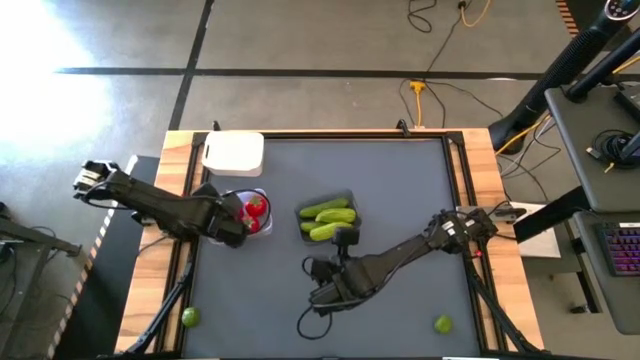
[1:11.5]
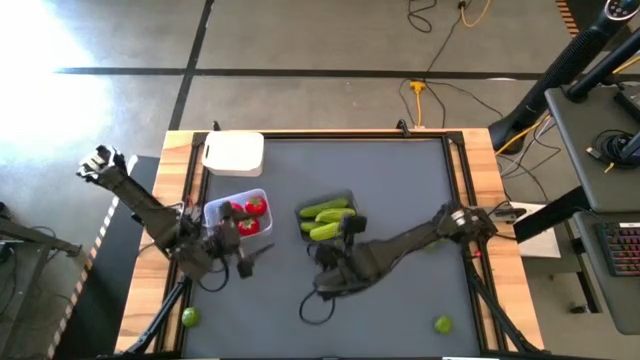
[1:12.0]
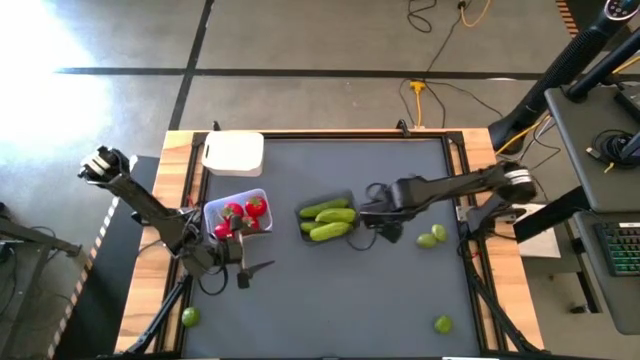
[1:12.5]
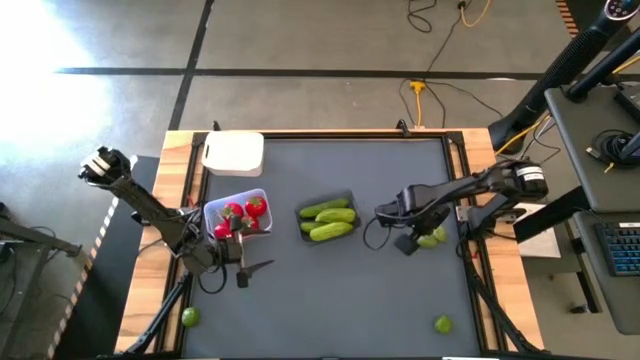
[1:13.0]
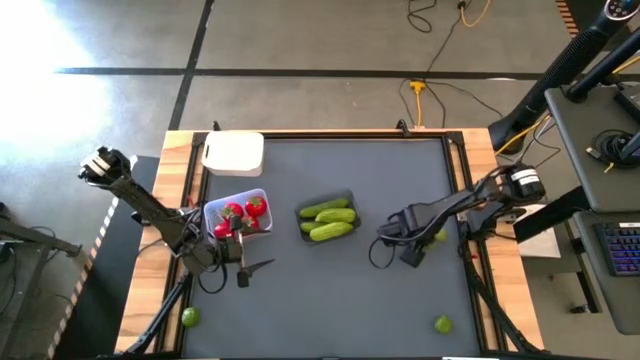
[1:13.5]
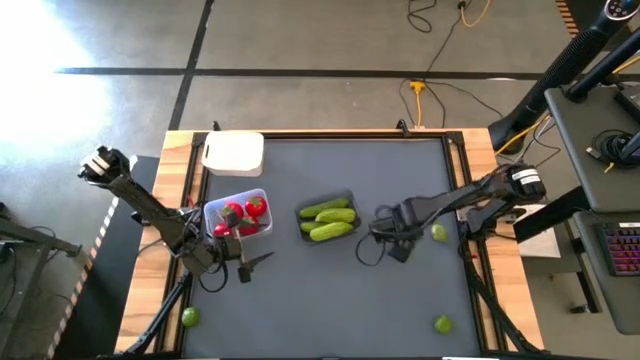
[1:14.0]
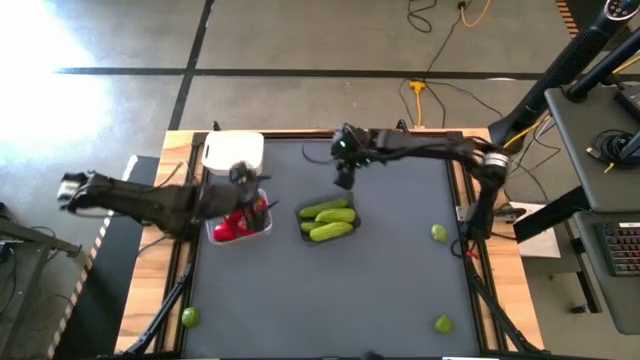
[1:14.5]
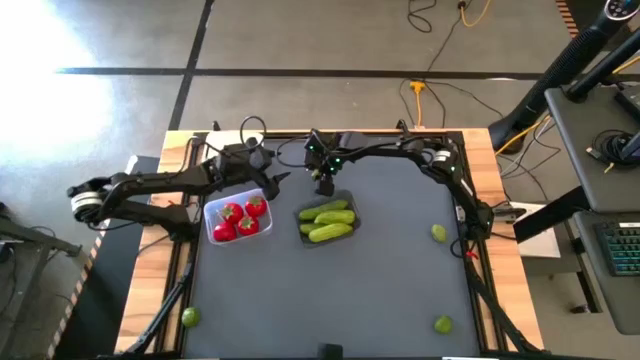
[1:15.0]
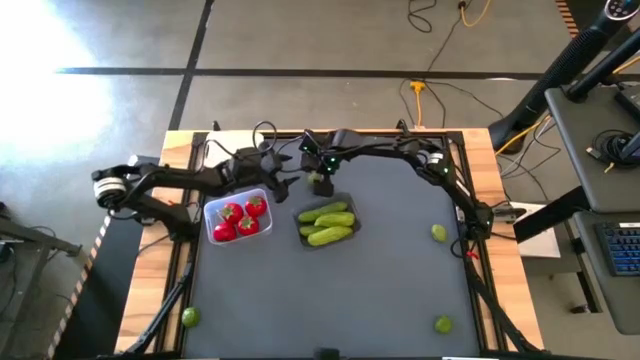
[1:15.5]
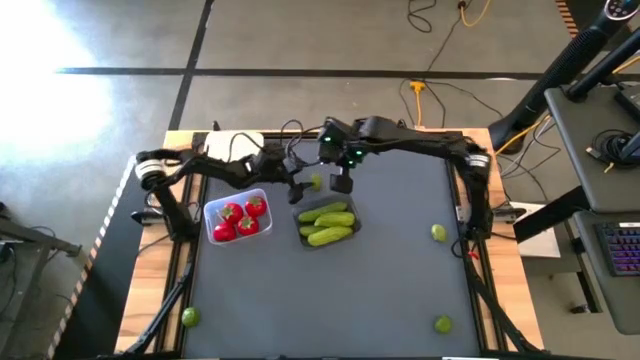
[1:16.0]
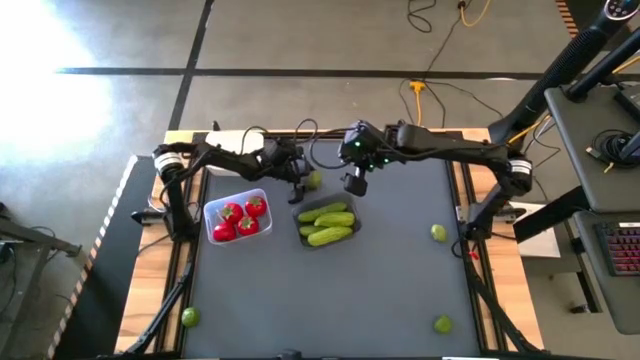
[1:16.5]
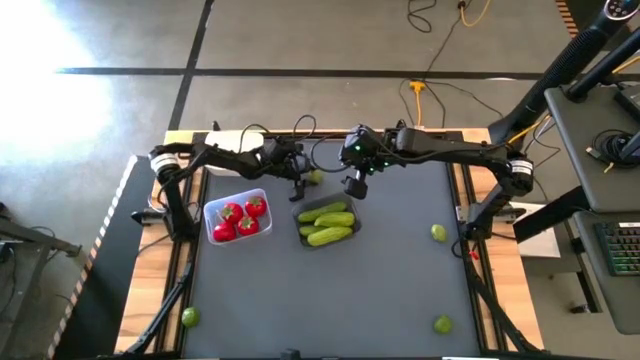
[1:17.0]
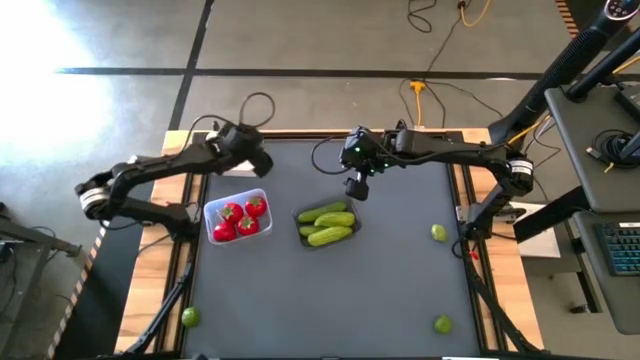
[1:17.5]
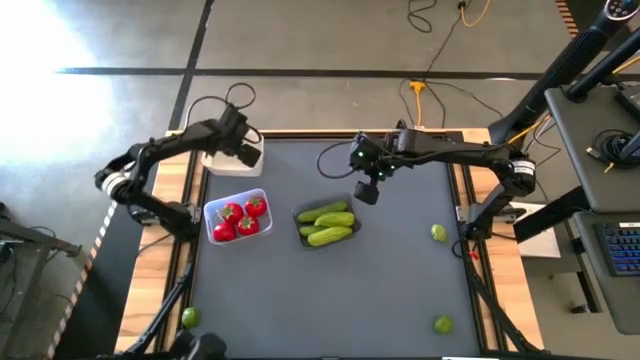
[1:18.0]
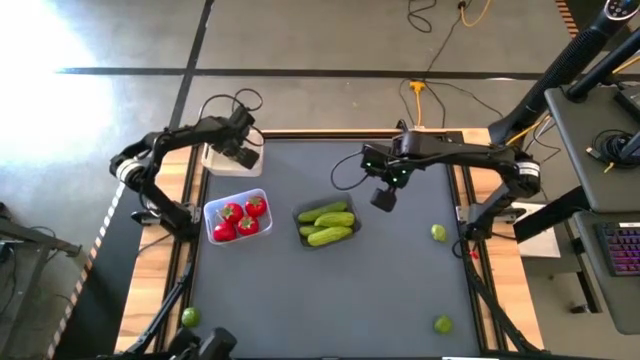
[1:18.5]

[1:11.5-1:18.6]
Task: Sort produce into baskets
Put the lemon into the white bin

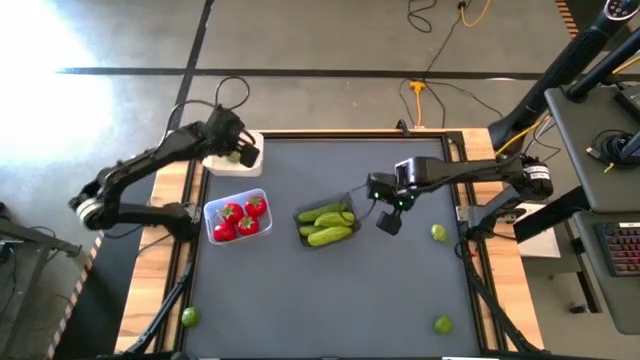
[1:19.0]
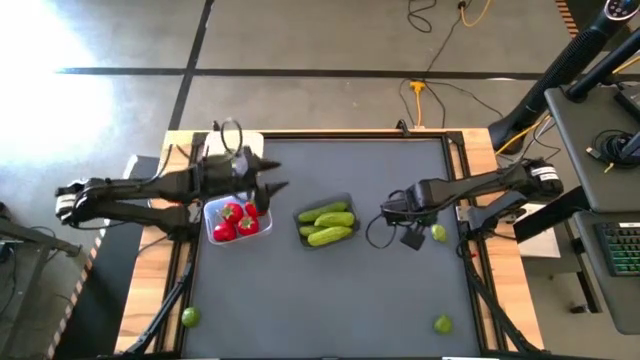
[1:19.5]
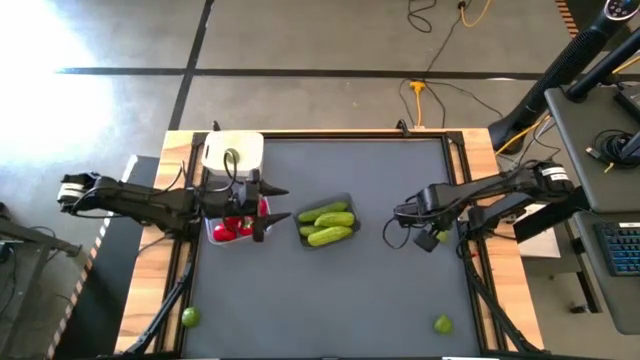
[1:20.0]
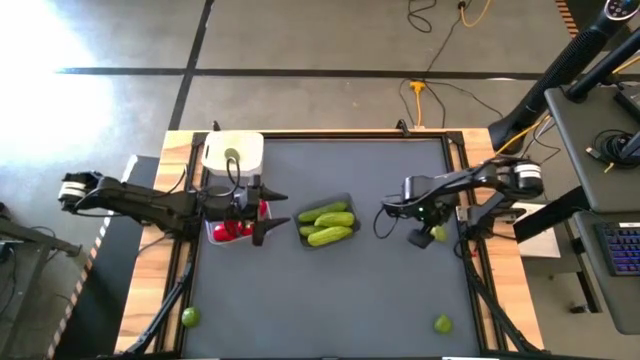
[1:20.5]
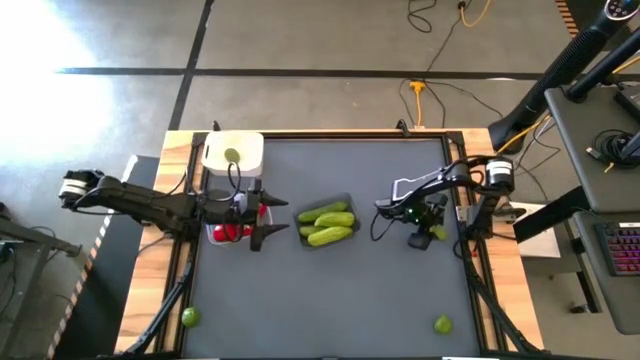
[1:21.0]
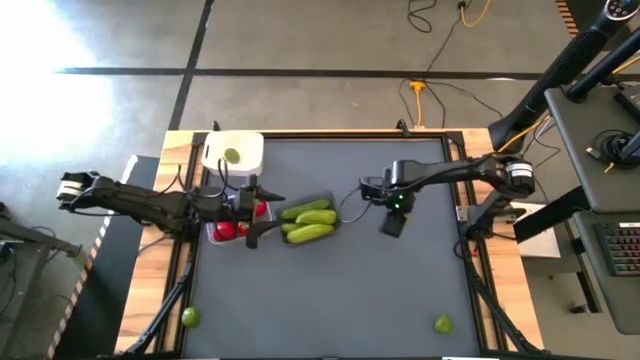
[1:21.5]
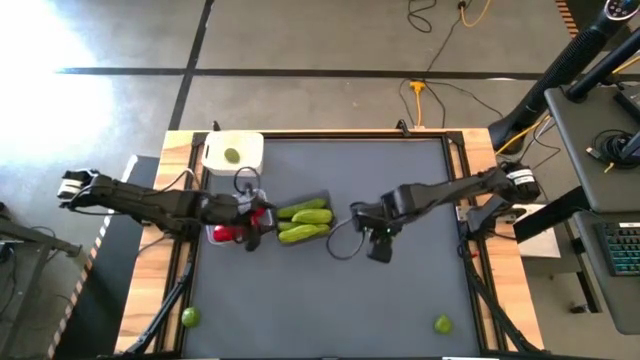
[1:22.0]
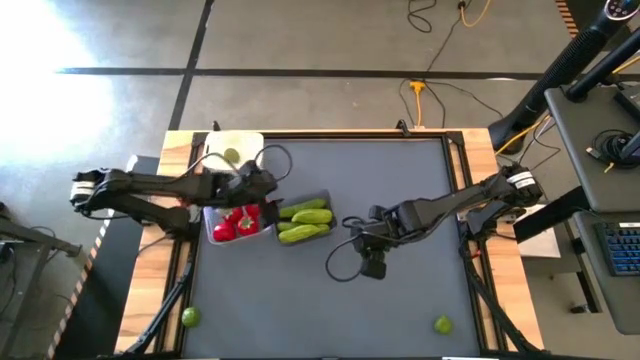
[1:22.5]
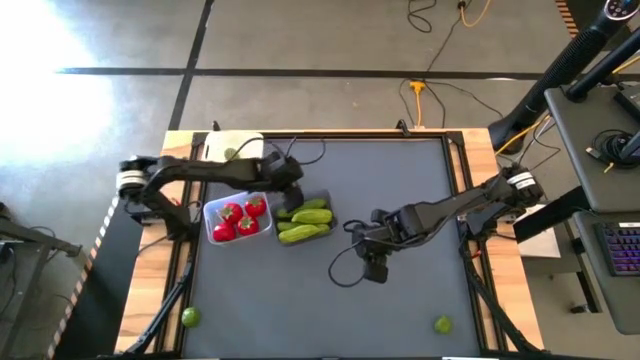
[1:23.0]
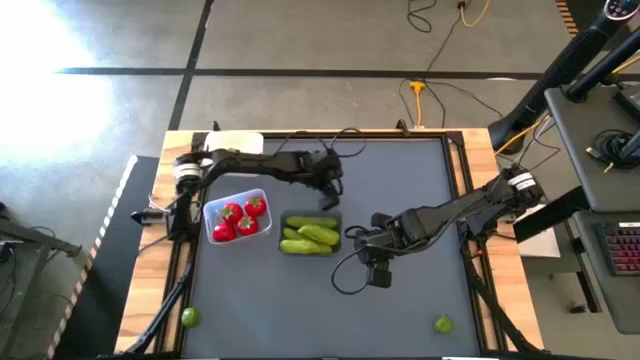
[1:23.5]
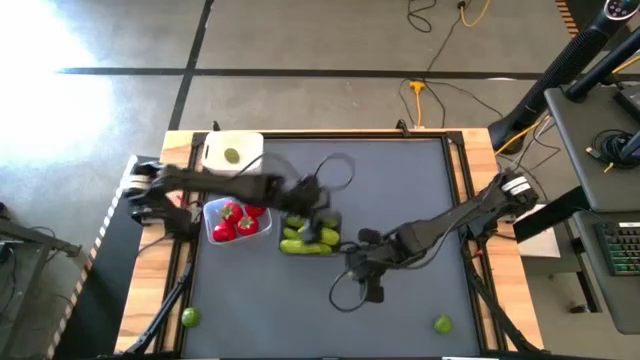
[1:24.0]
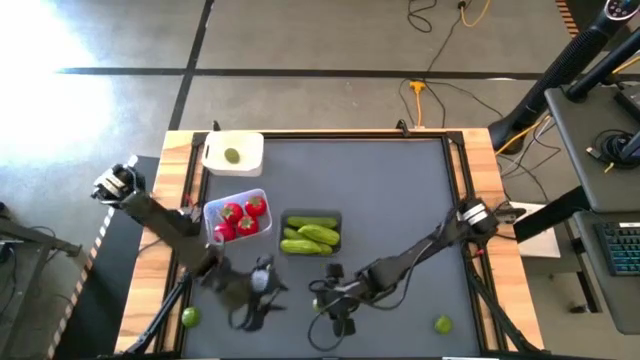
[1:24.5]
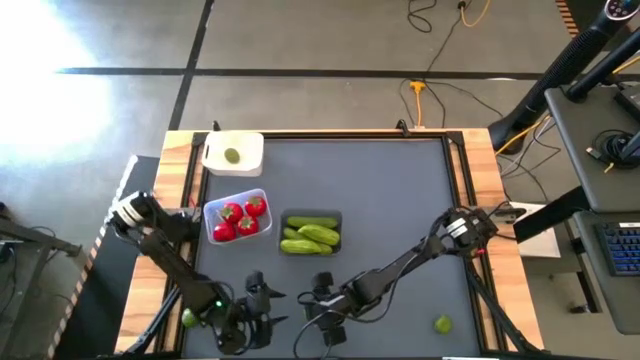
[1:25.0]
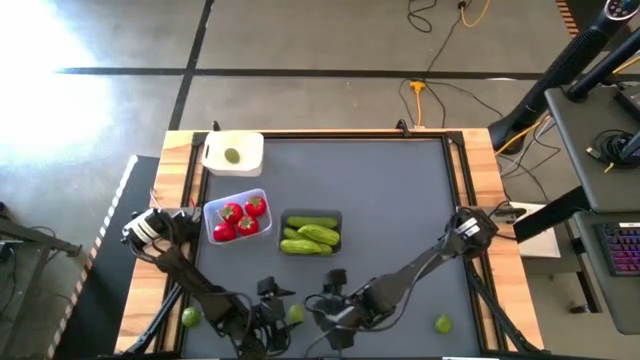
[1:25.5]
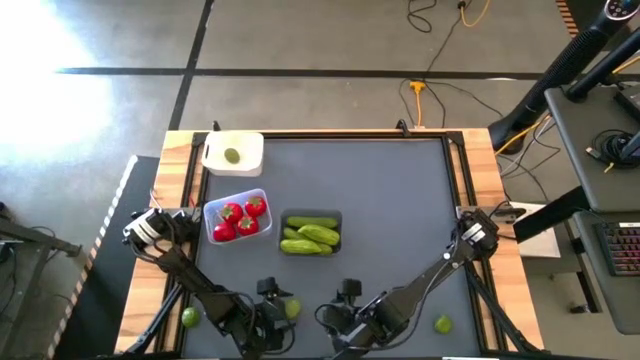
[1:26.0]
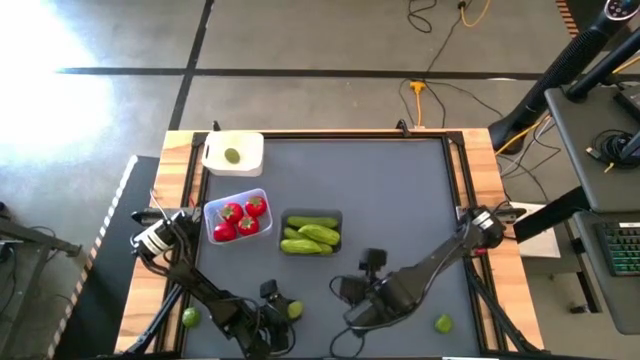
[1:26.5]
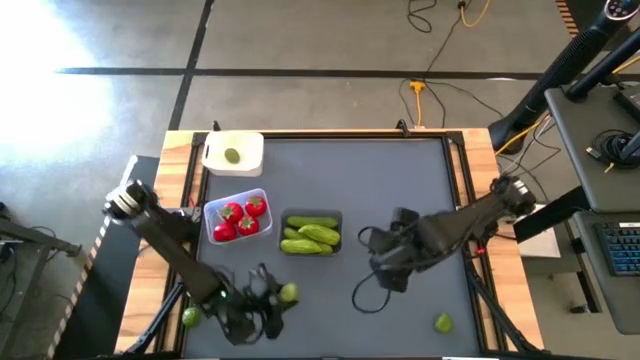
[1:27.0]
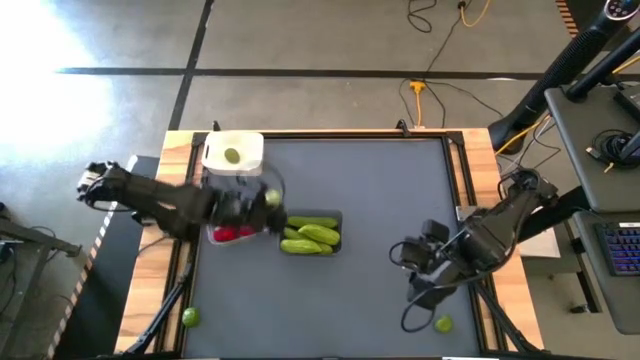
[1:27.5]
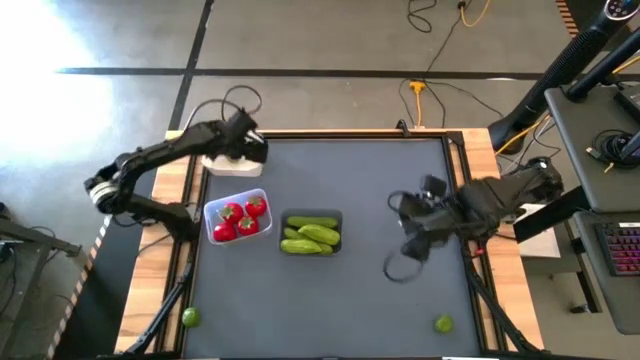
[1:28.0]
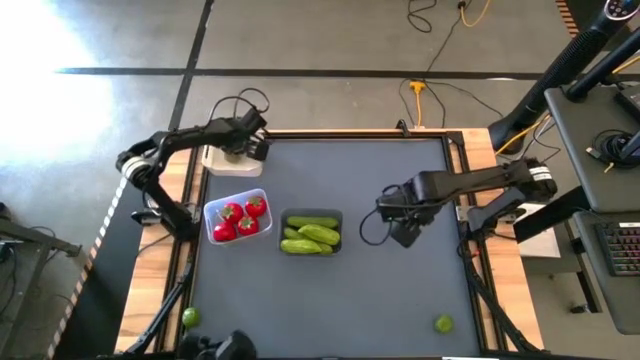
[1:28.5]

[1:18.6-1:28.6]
Put the lemon into the white bin

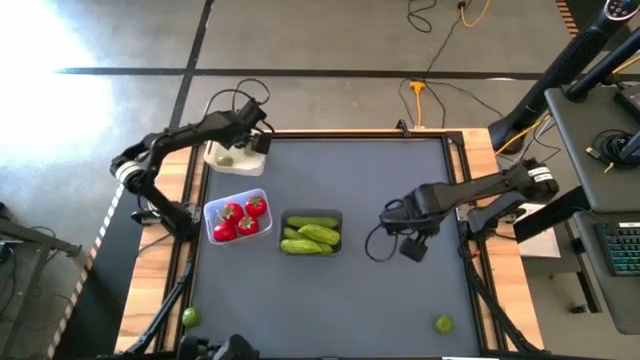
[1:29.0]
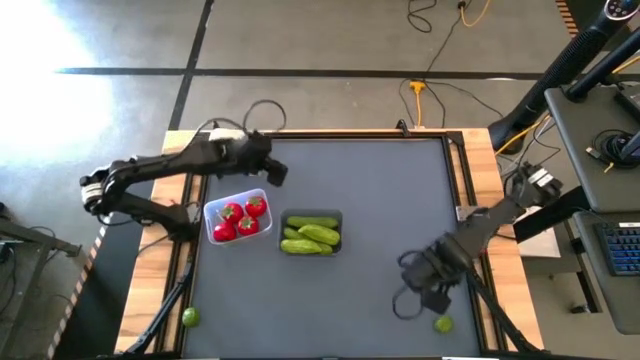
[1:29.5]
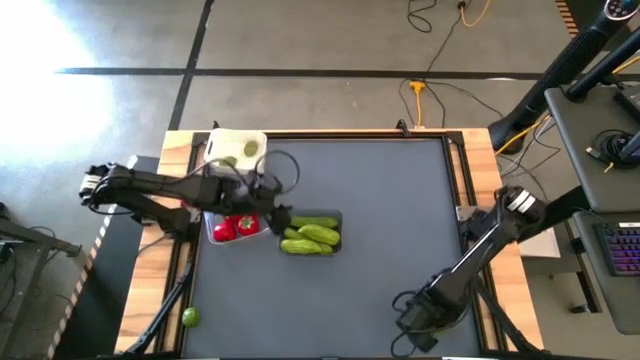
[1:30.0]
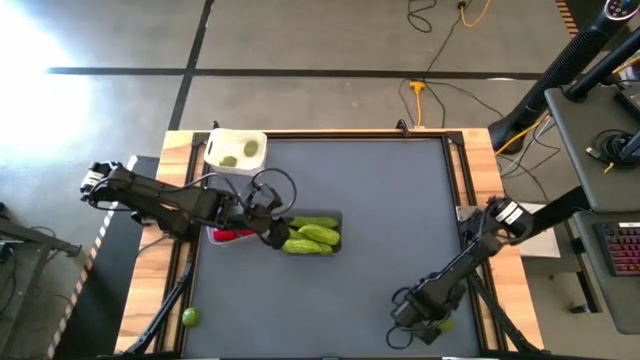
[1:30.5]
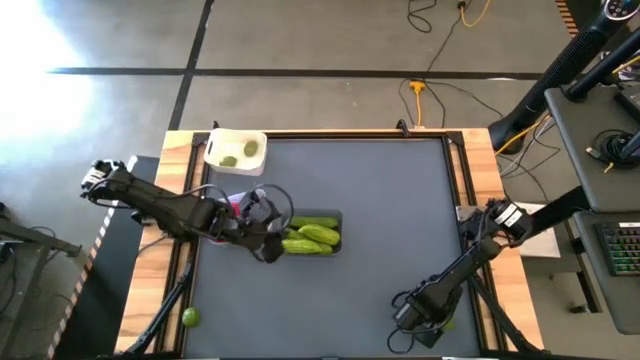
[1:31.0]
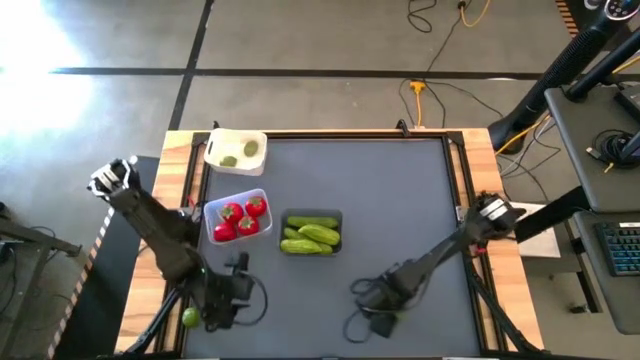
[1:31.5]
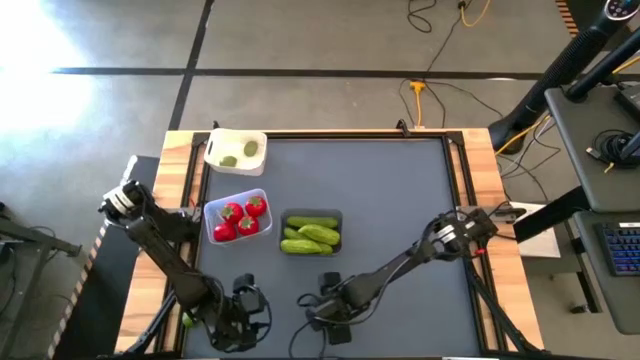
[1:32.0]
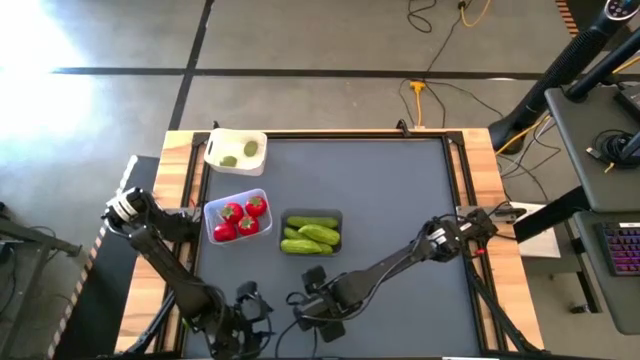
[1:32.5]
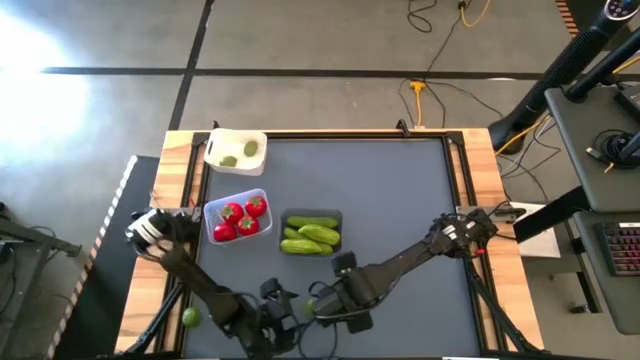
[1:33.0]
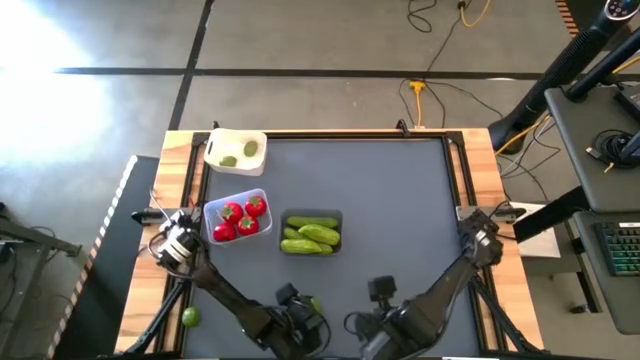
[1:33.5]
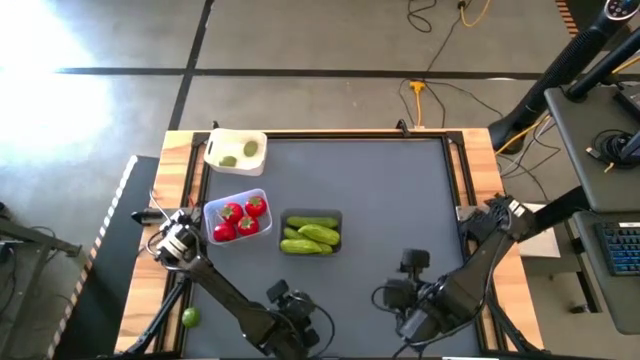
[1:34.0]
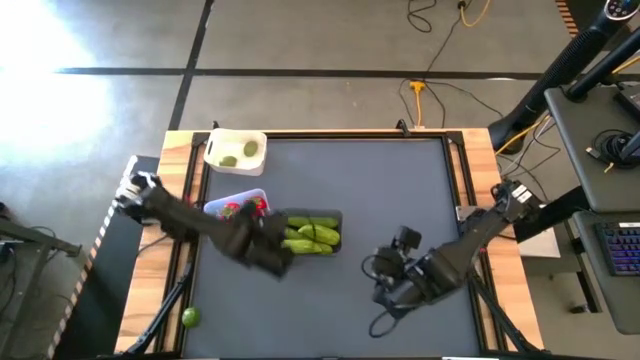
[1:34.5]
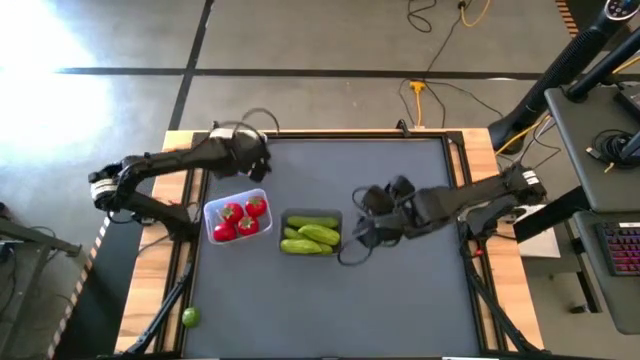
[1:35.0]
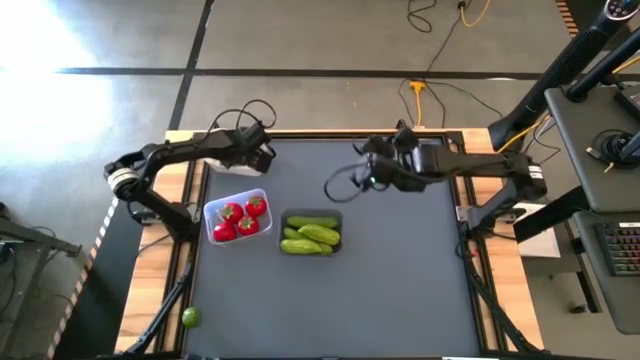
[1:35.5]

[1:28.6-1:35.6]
Put the lemon into the white bin
